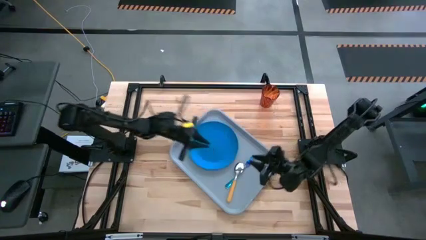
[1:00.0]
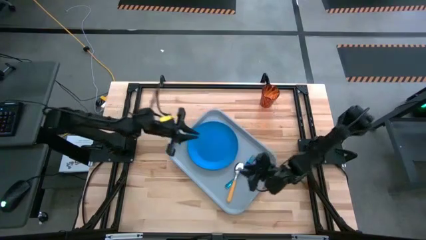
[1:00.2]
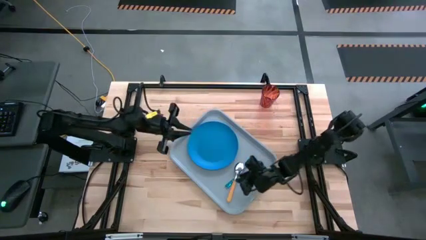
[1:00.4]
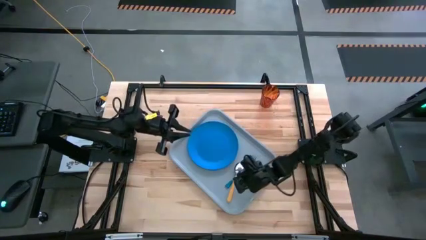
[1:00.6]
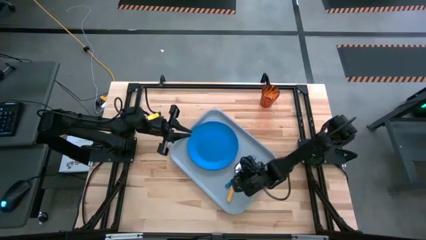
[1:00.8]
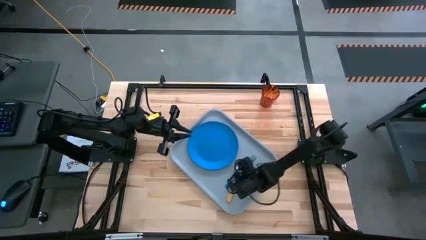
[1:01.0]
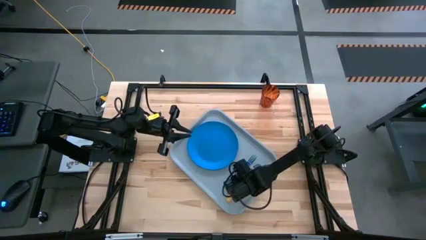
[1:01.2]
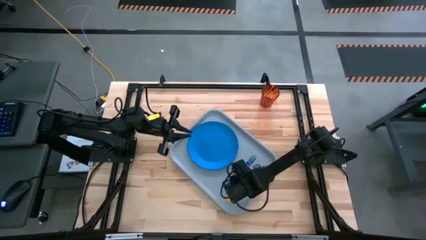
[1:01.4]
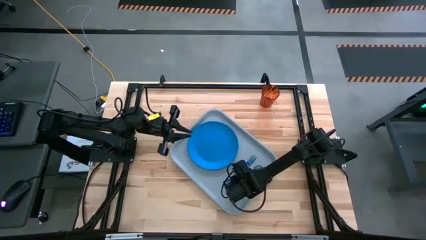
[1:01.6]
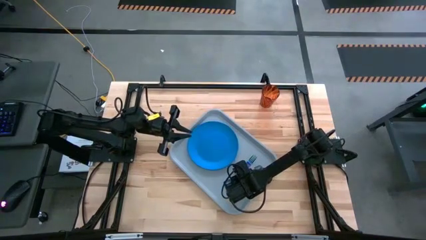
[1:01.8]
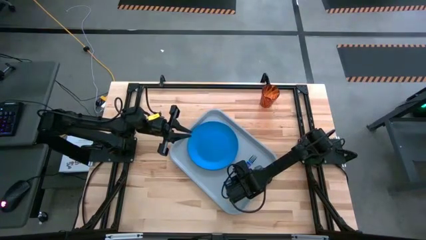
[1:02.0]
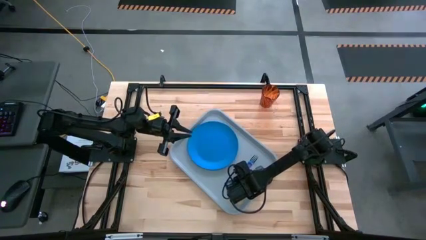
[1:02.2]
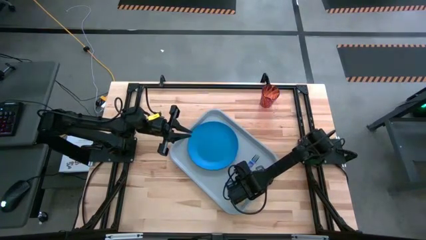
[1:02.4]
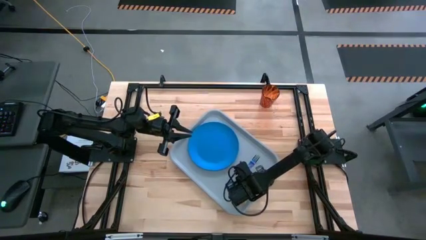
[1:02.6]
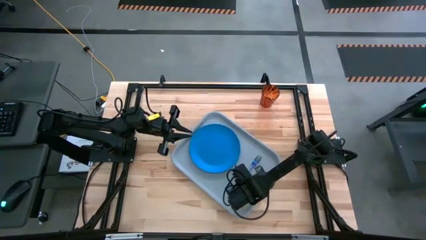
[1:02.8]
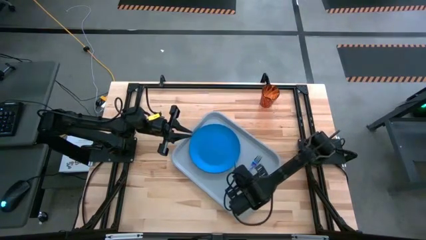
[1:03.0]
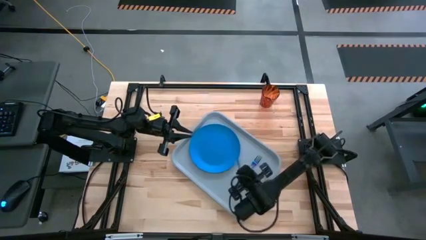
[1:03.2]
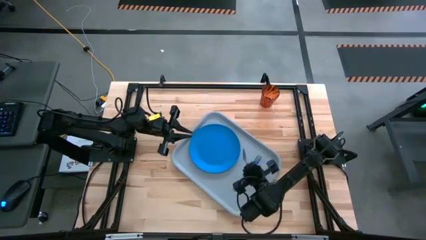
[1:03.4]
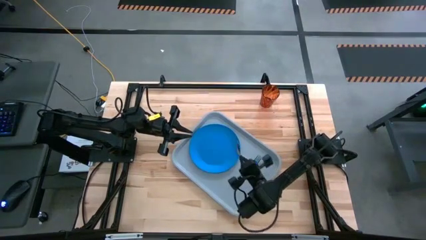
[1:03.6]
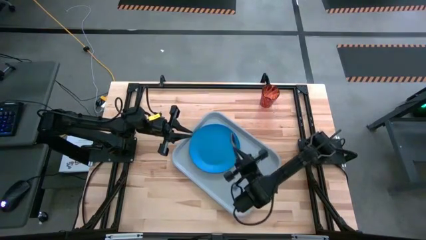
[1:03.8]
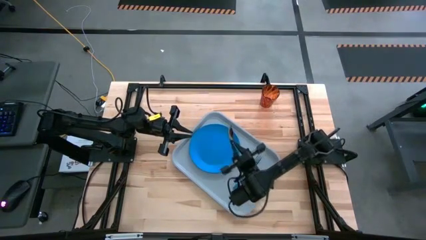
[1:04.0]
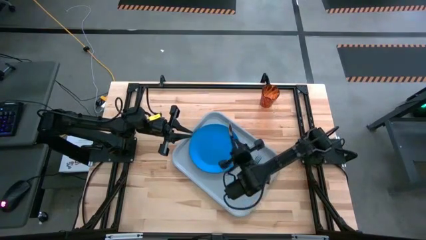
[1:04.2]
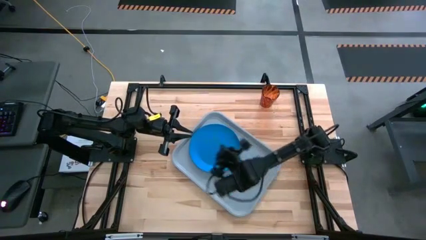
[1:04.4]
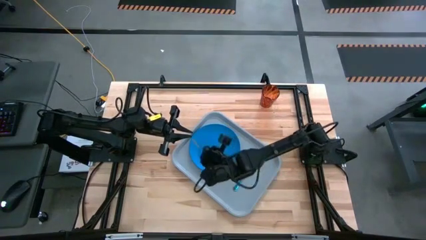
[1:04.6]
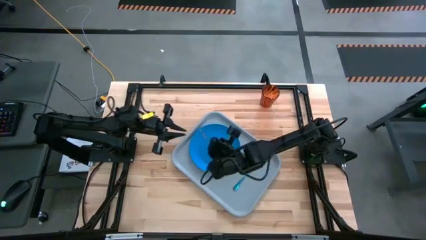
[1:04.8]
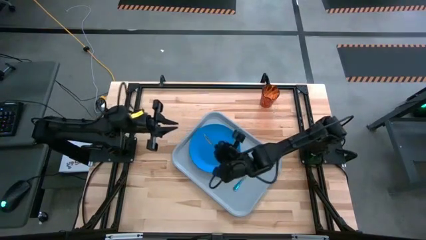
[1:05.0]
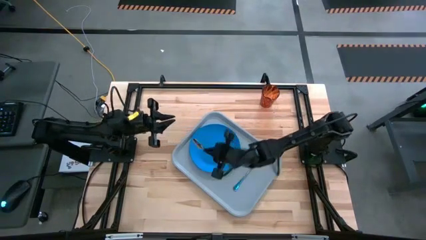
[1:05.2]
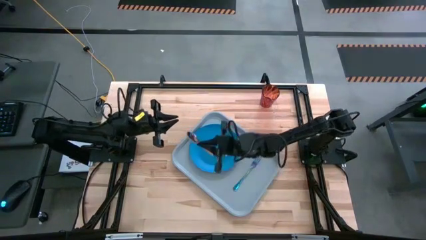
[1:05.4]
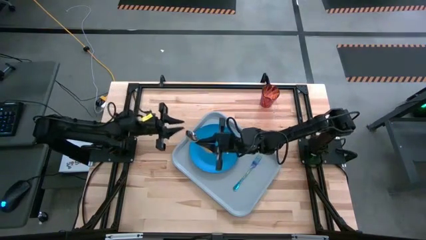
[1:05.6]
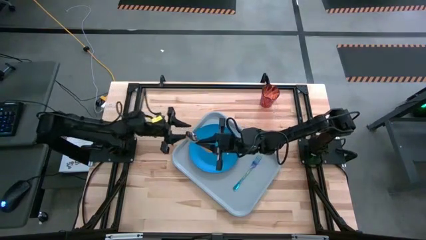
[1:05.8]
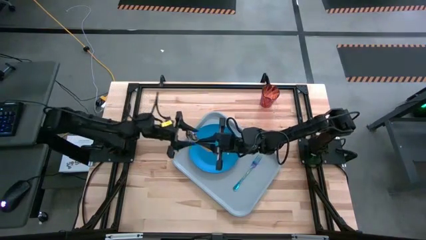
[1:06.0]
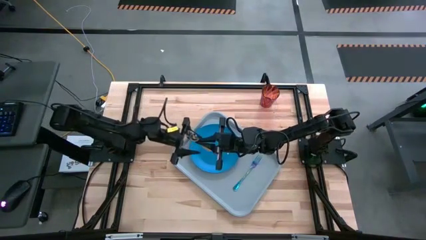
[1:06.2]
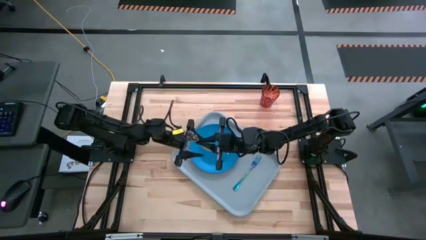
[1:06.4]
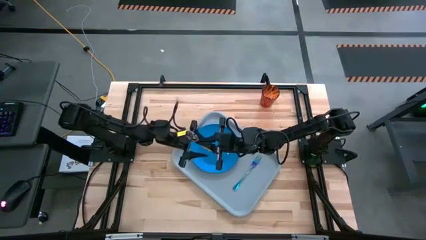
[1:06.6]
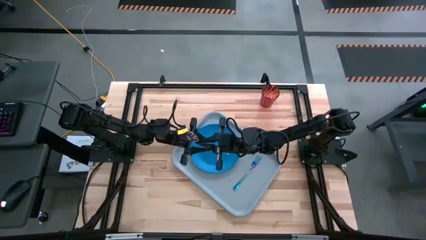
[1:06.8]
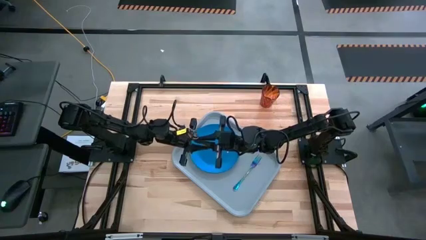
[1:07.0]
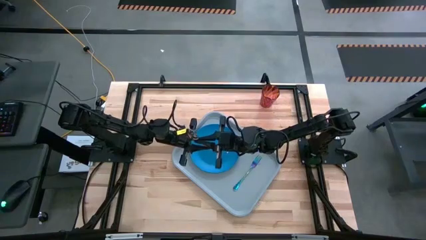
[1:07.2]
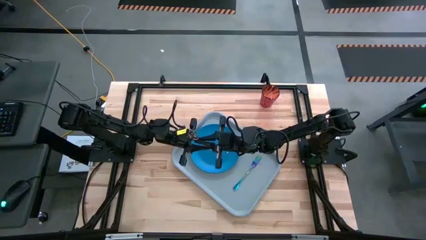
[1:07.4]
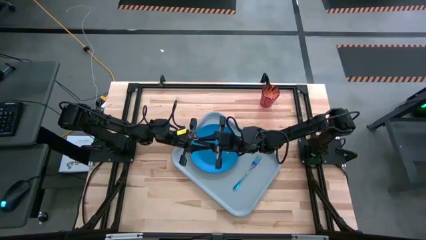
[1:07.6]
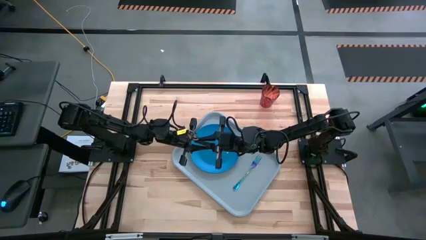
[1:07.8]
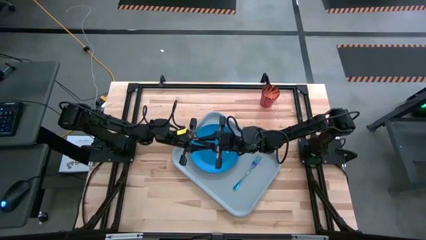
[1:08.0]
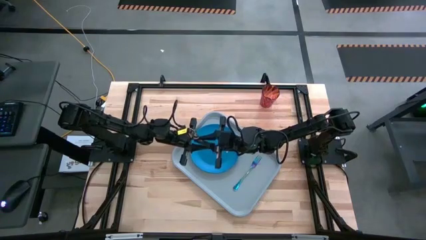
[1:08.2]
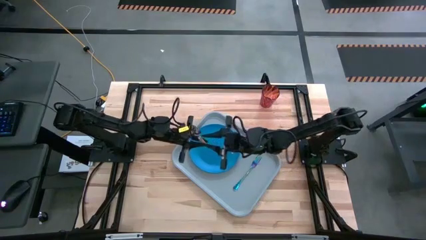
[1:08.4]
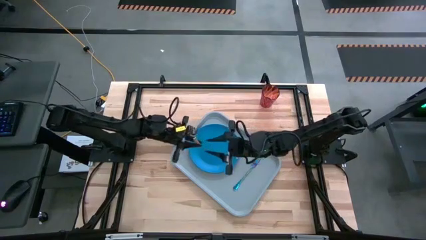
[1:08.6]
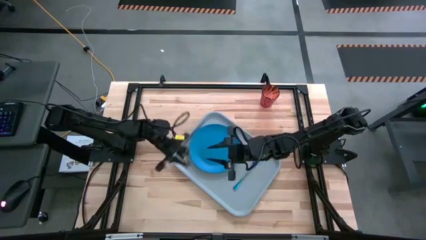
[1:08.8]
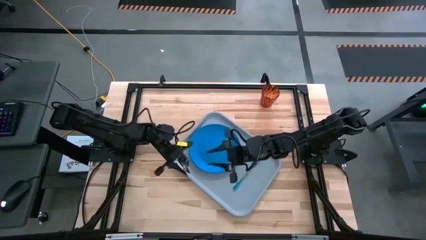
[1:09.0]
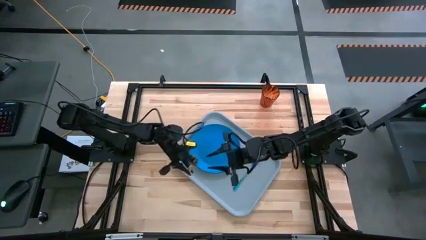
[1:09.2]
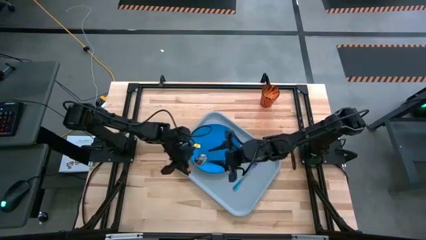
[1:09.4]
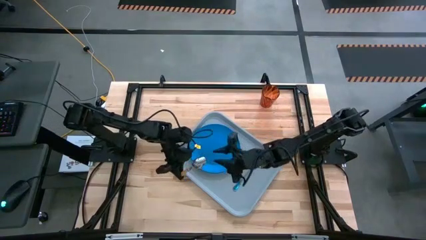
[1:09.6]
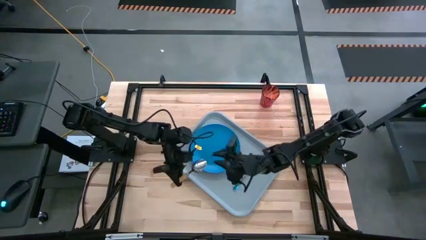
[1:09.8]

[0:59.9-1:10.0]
Task: Pick and place plate/cup/fork/spoon on tray
Put the yellow spoon on the right side of the gray serving tray
